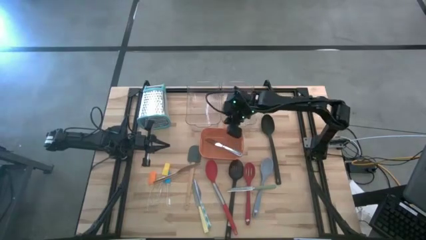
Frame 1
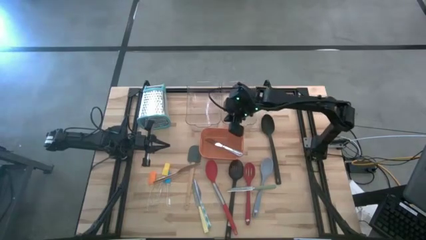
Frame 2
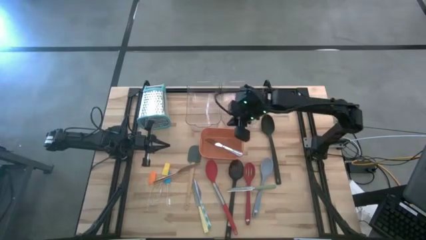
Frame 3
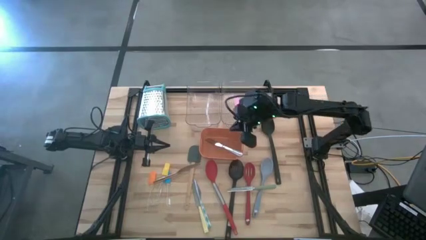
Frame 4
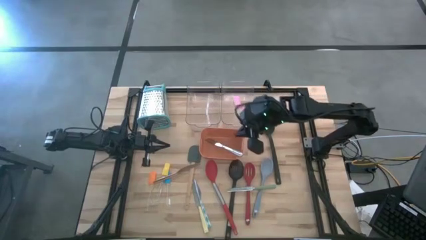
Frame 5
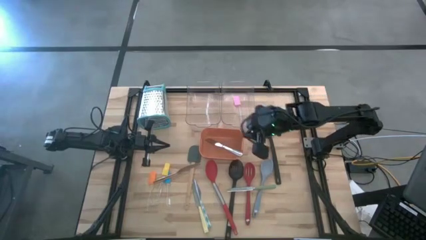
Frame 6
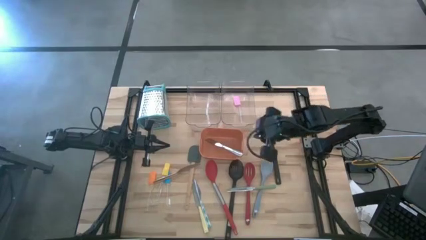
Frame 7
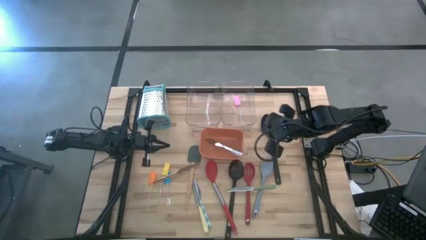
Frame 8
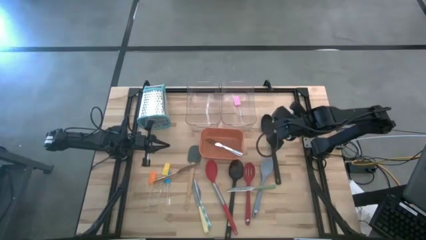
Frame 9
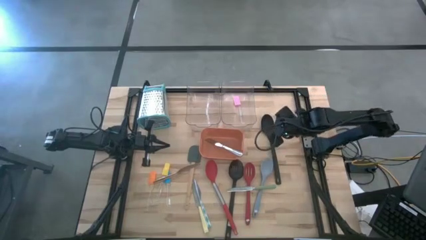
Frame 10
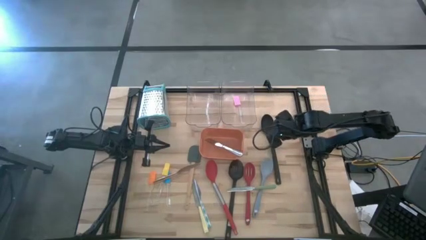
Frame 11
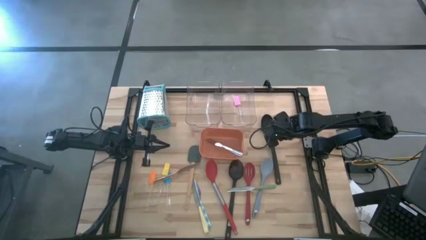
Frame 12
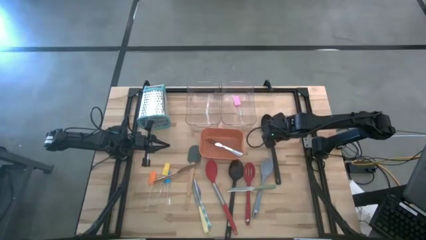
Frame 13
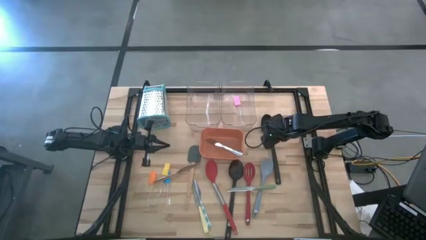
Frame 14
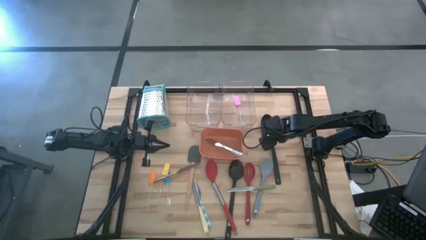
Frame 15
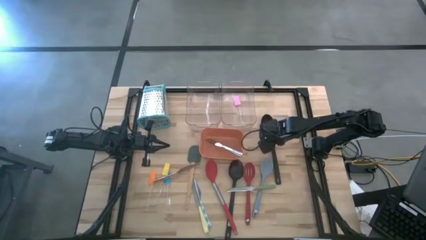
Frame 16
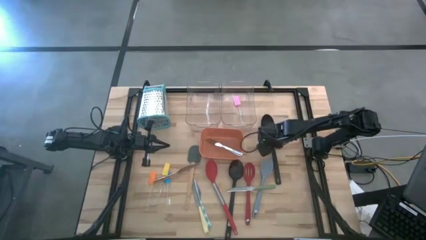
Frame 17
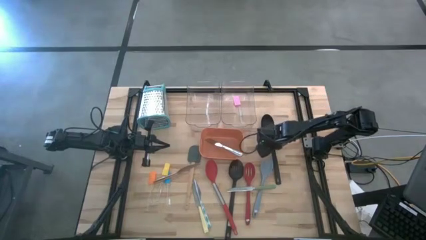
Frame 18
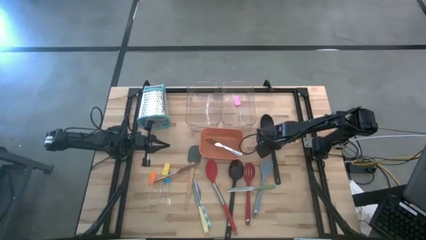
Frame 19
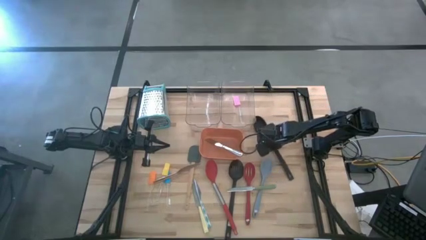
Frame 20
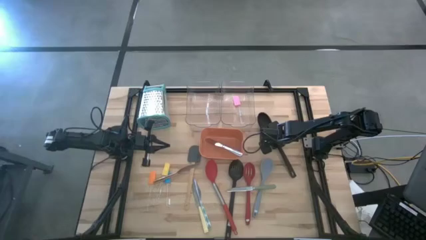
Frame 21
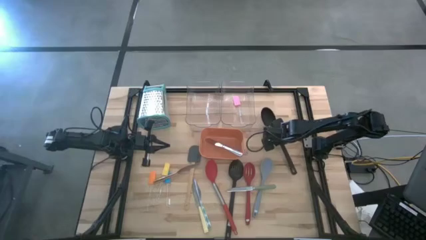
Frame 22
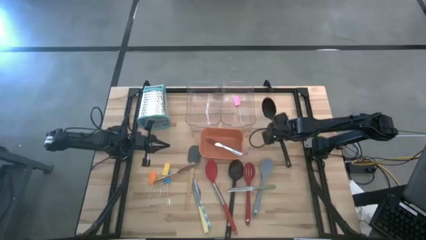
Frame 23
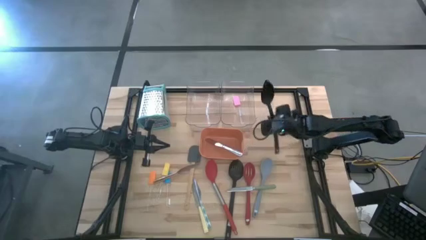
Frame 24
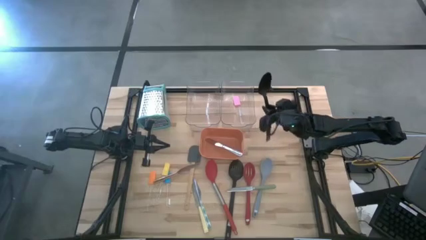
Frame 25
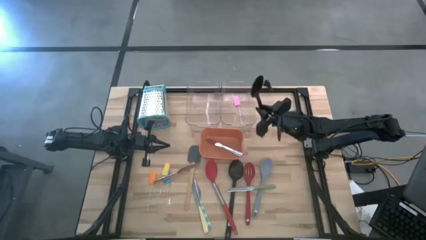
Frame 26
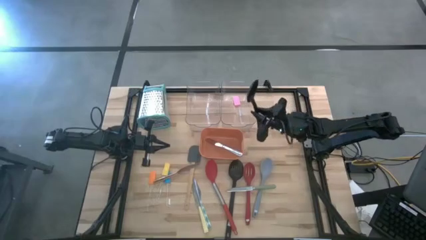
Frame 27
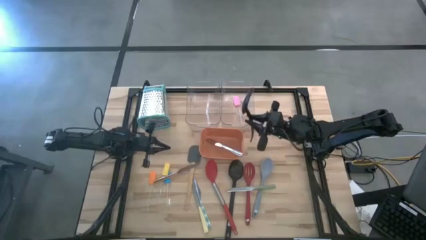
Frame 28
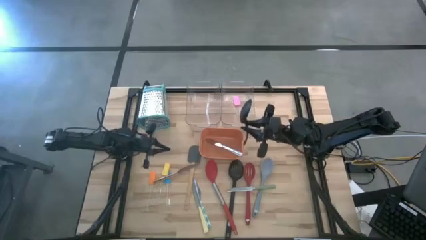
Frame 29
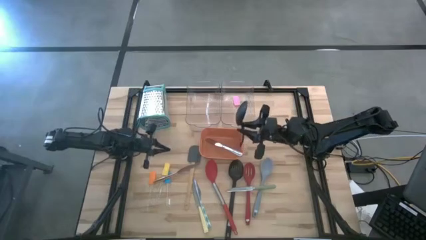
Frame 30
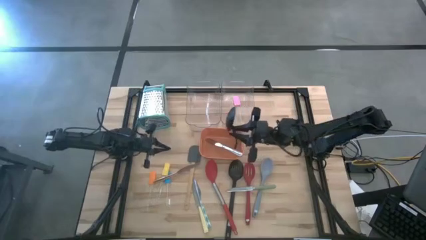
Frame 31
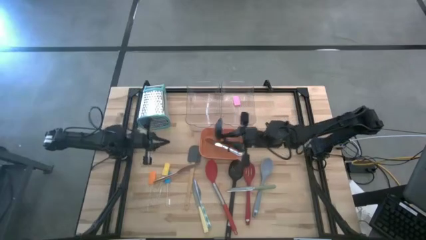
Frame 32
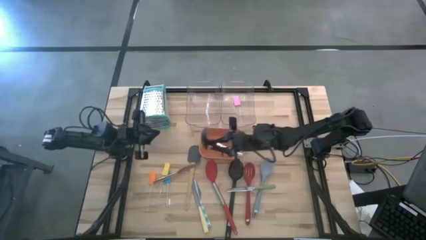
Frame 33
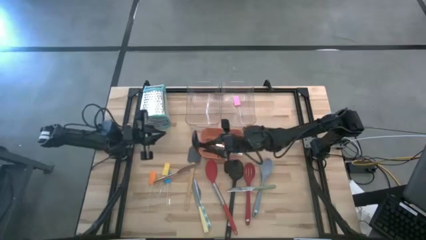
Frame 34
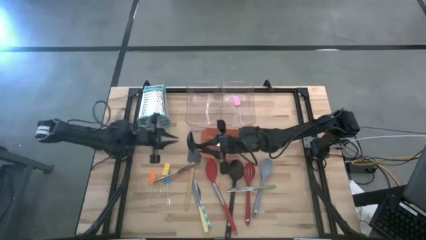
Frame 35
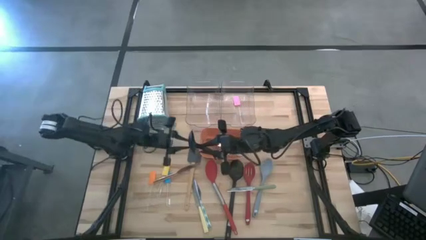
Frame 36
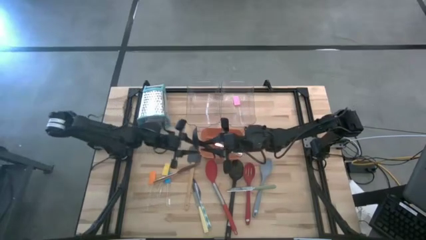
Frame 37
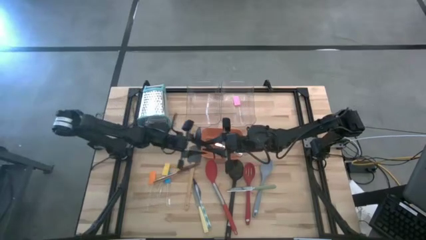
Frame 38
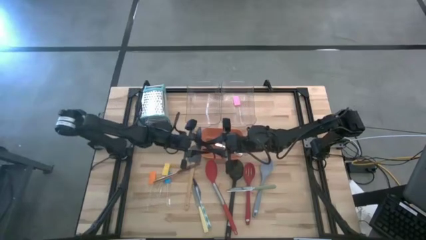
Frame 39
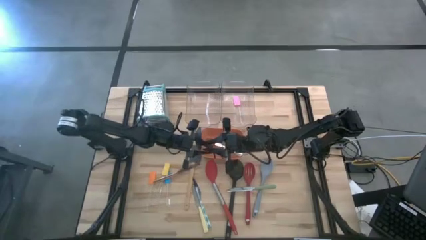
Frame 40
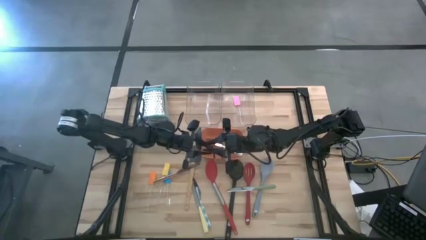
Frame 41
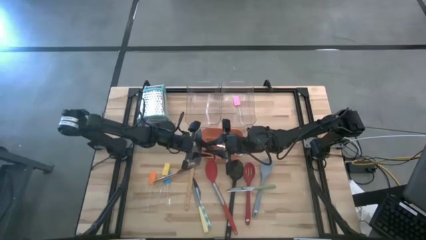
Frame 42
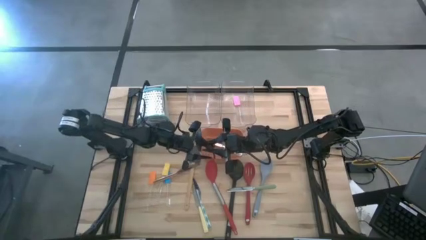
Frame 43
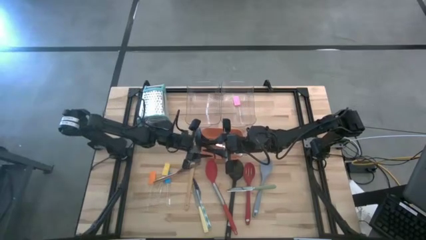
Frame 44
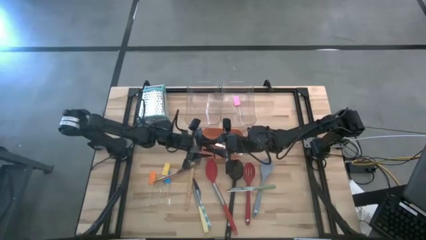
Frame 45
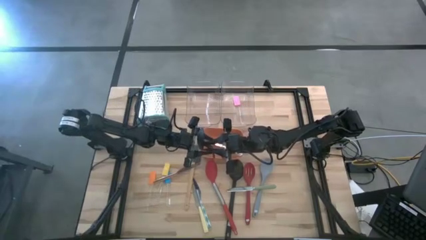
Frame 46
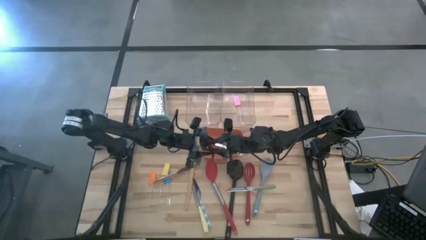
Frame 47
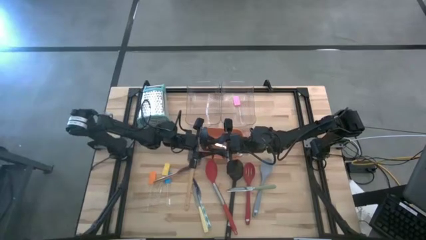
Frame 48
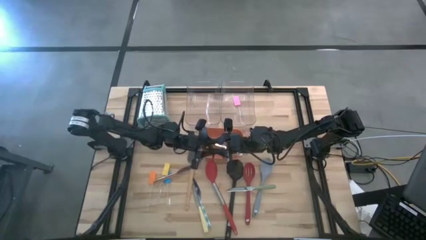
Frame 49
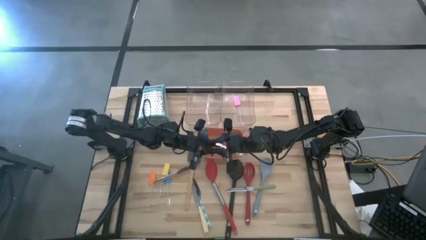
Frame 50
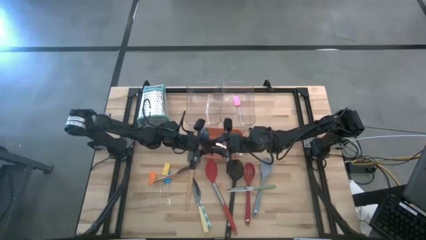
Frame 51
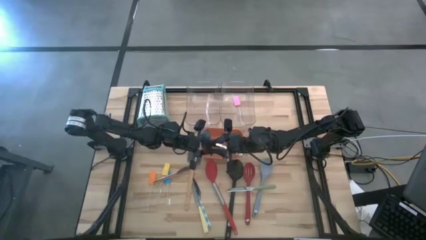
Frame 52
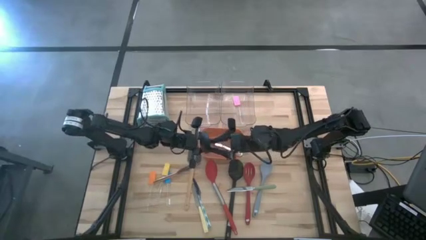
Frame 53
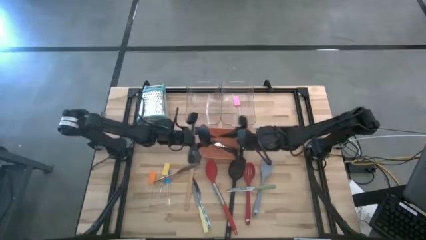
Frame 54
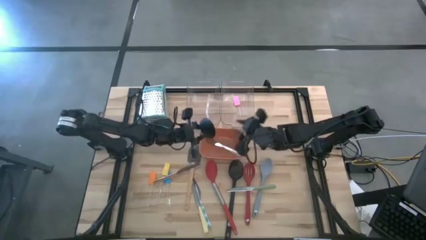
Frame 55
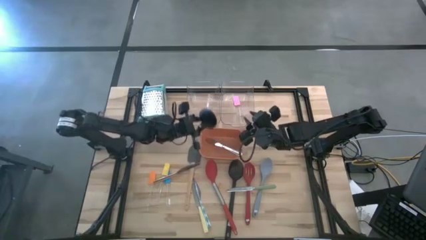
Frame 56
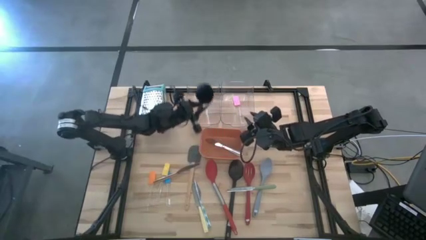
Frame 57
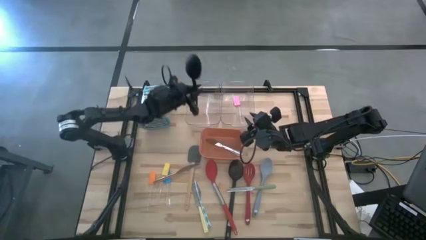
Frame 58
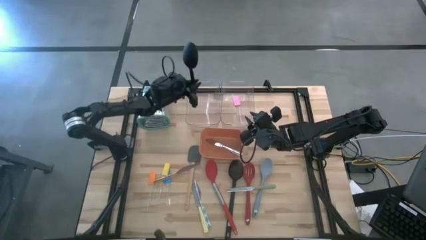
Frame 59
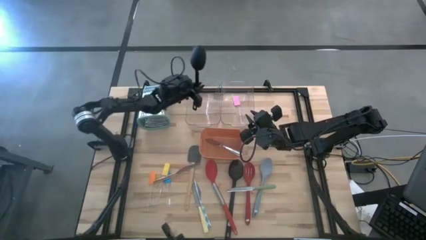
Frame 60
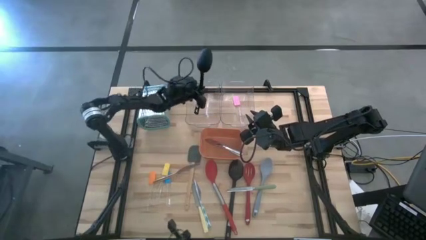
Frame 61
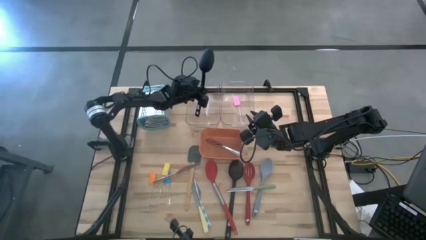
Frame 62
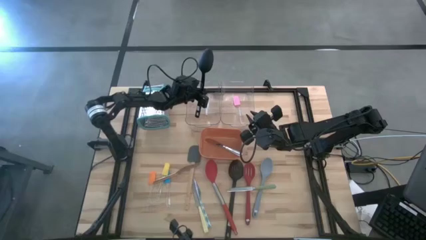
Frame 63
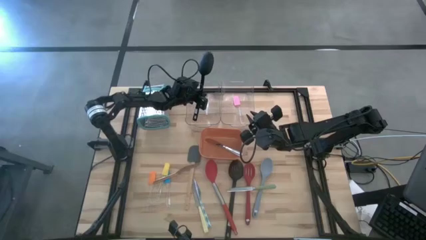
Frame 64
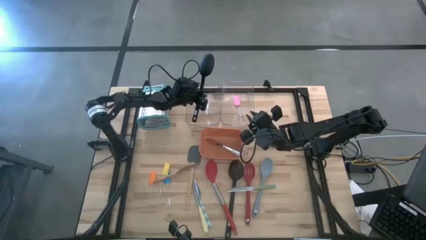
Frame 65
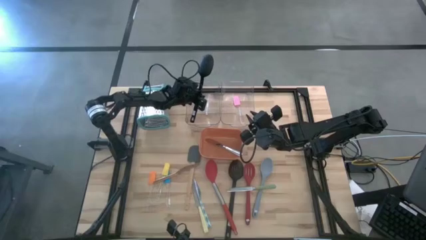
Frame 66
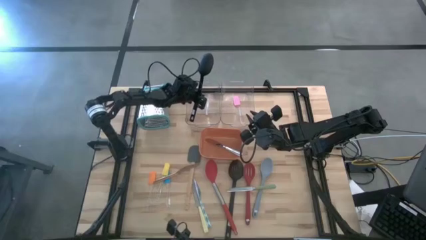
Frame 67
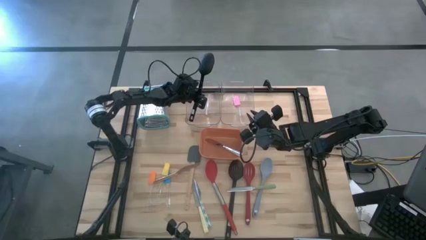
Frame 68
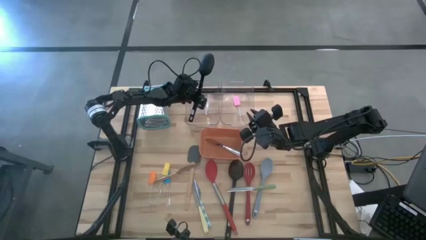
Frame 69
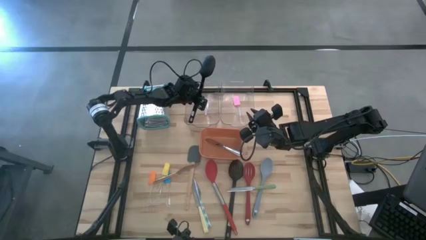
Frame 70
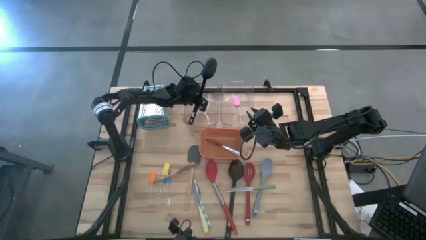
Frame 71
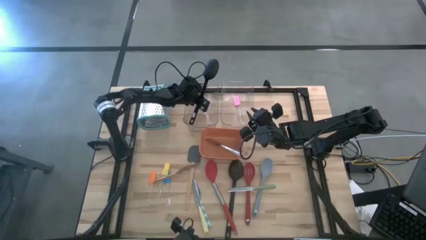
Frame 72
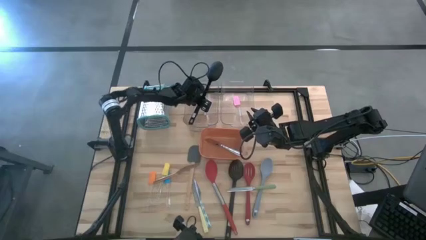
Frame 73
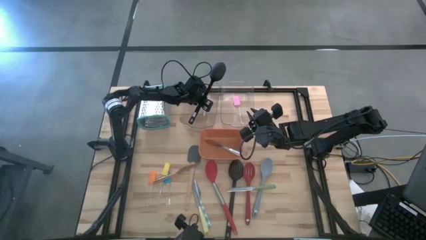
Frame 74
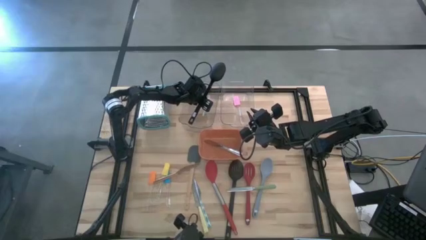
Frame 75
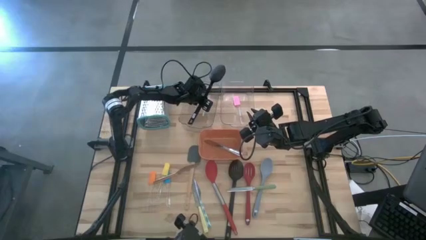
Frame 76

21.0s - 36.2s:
Task: Pick & Place Kitchen Items
Put the black serving spoon into the left transparent bin

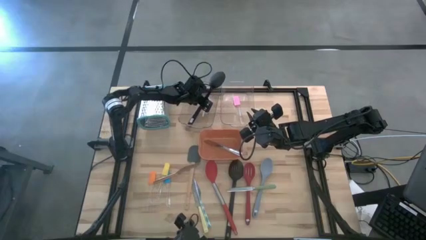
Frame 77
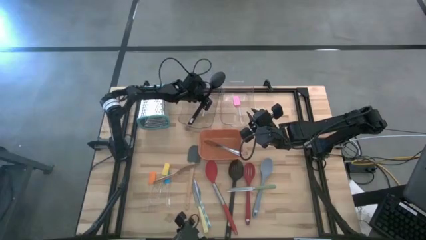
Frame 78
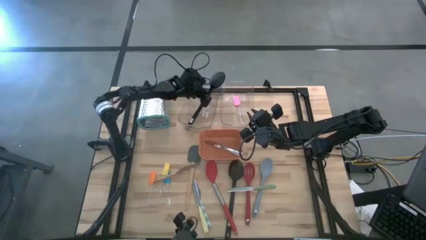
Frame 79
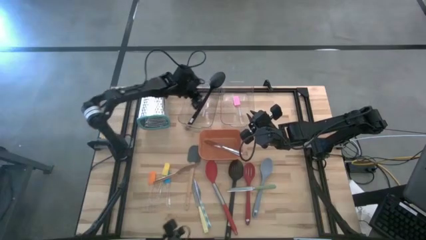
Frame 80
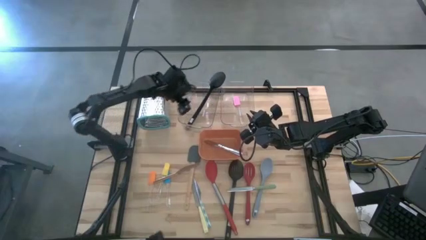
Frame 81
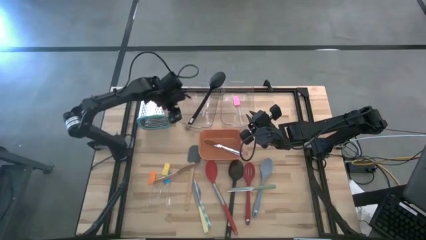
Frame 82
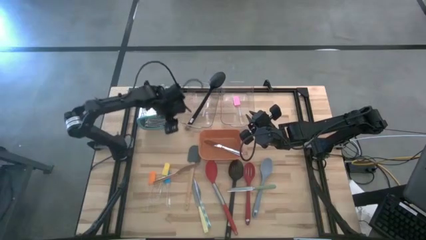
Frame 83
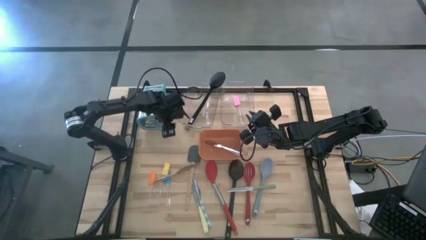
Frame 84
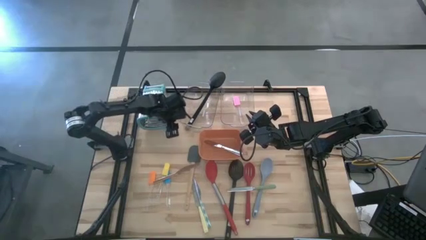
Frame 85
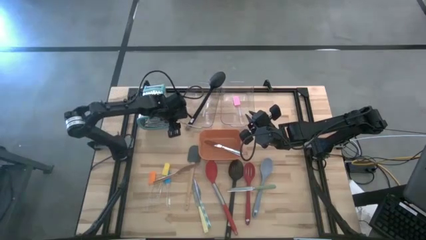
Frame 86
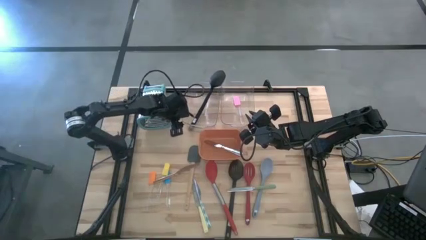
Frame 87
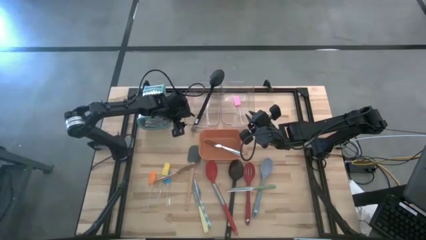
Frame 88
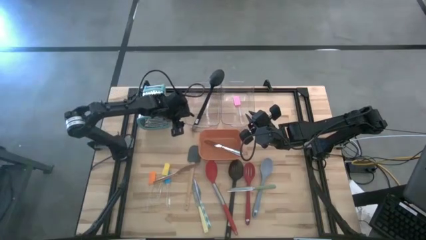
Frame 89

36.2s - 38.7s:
Adjust the left transparent bin
